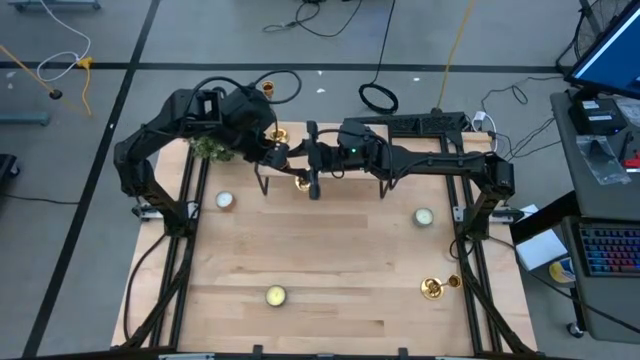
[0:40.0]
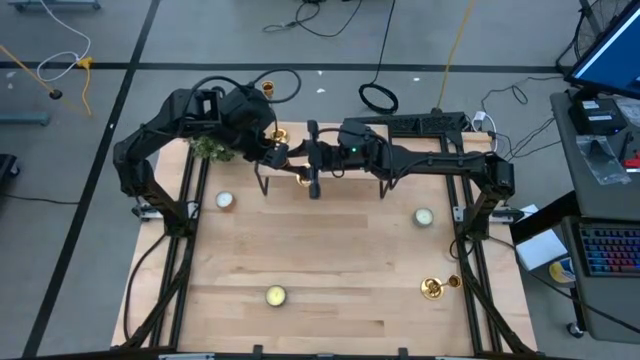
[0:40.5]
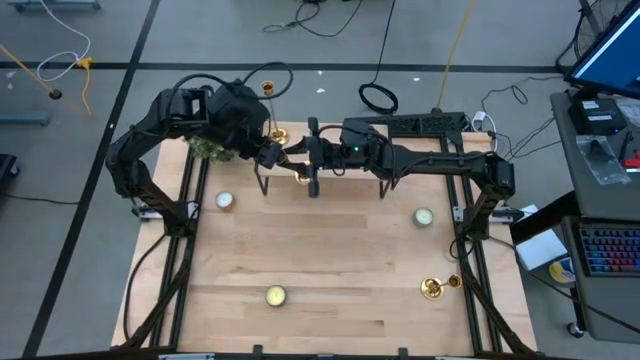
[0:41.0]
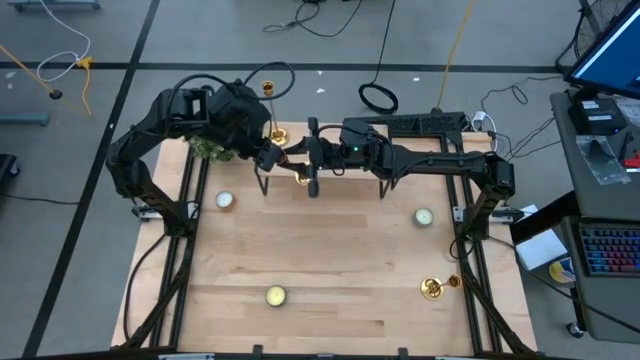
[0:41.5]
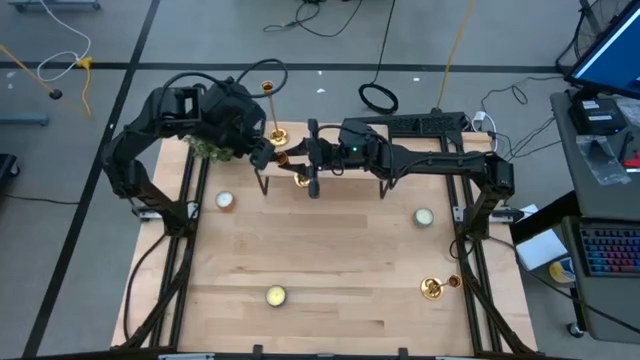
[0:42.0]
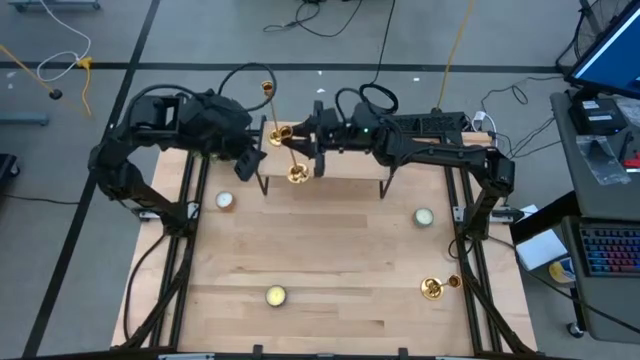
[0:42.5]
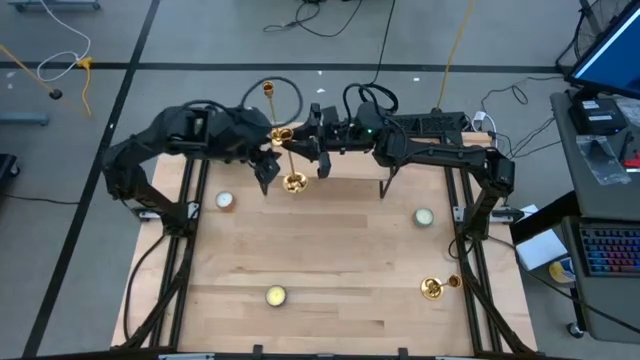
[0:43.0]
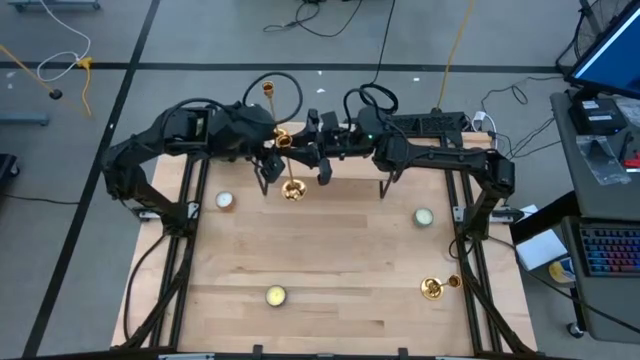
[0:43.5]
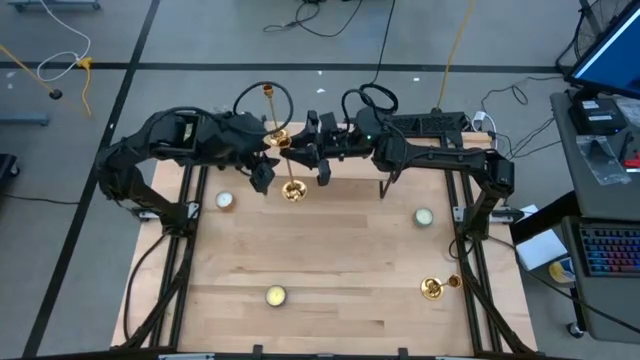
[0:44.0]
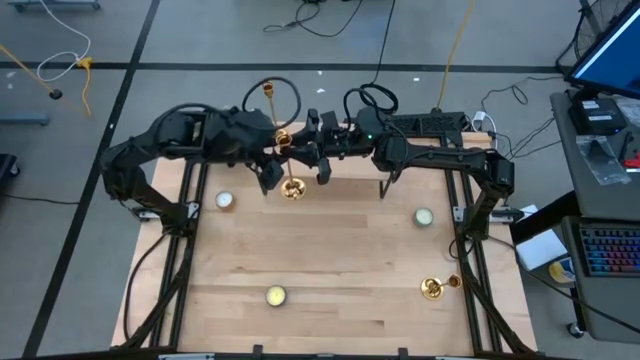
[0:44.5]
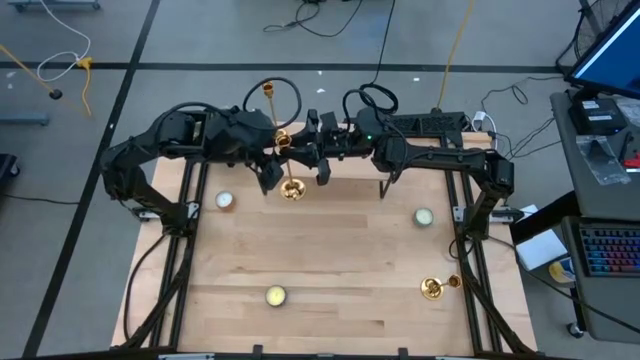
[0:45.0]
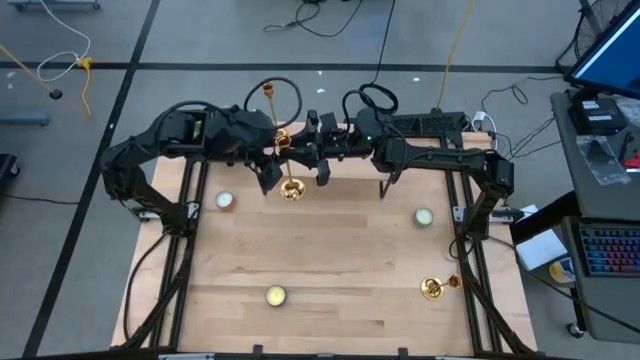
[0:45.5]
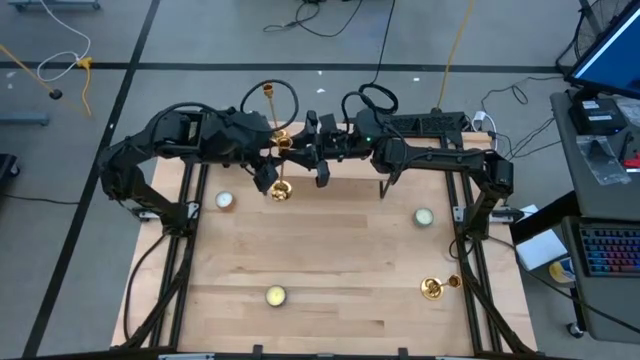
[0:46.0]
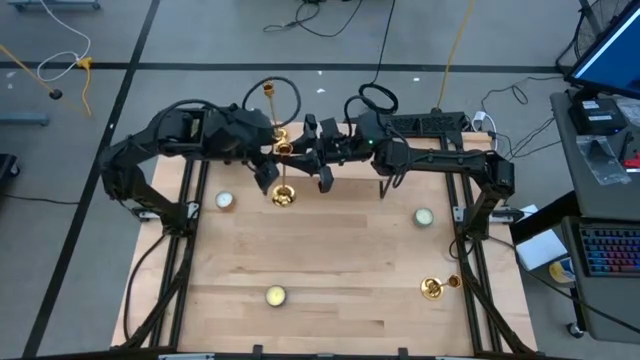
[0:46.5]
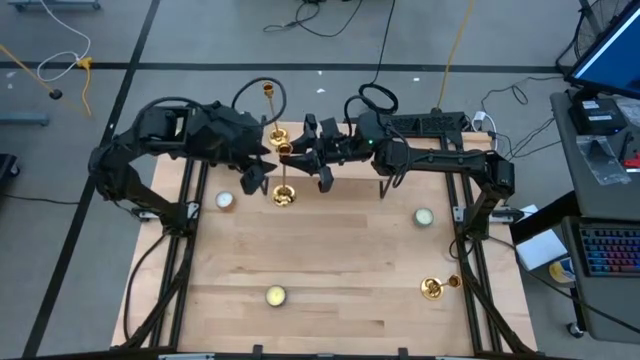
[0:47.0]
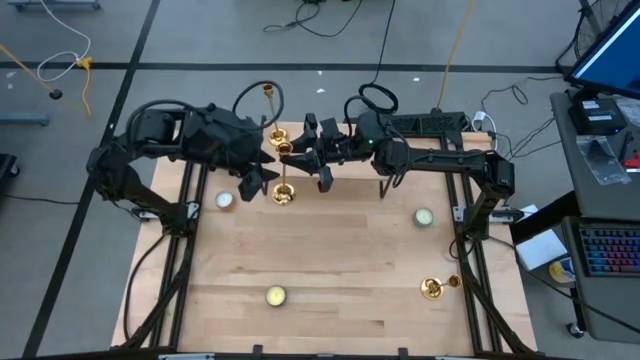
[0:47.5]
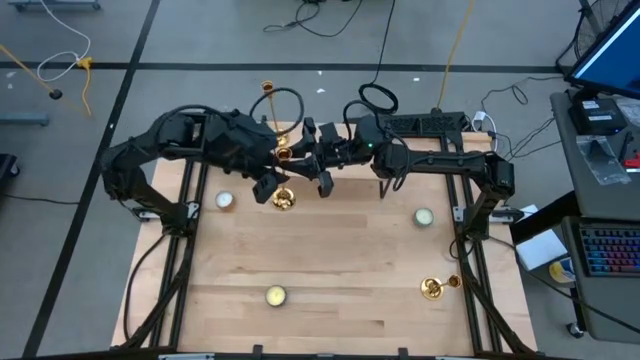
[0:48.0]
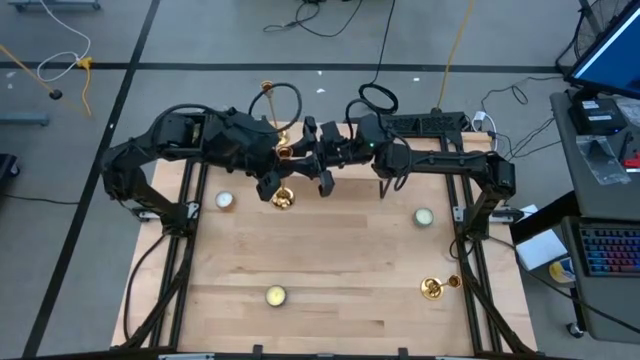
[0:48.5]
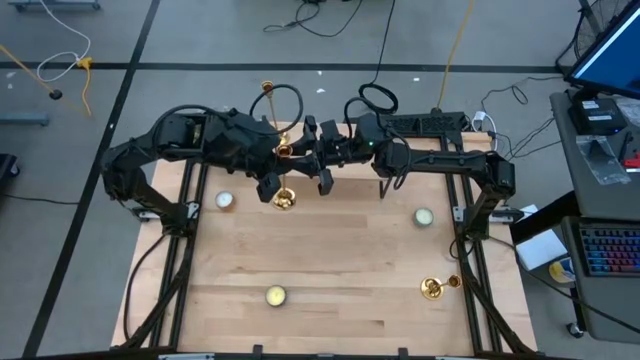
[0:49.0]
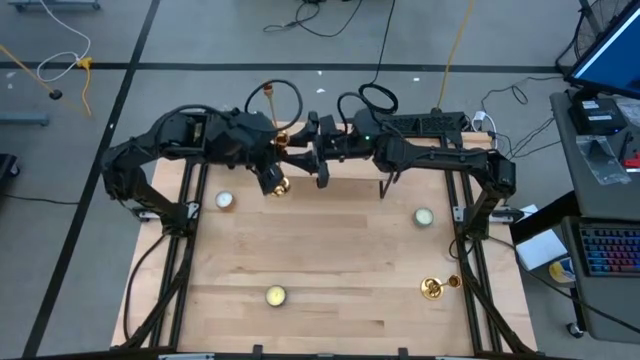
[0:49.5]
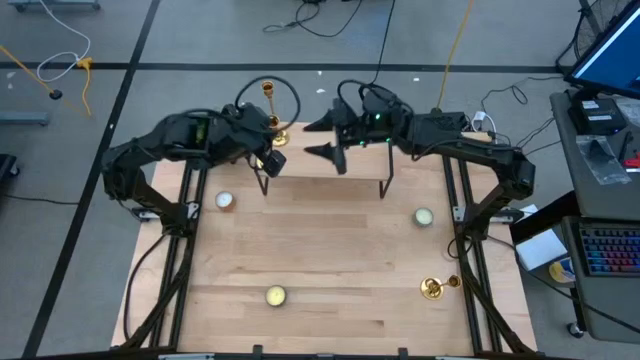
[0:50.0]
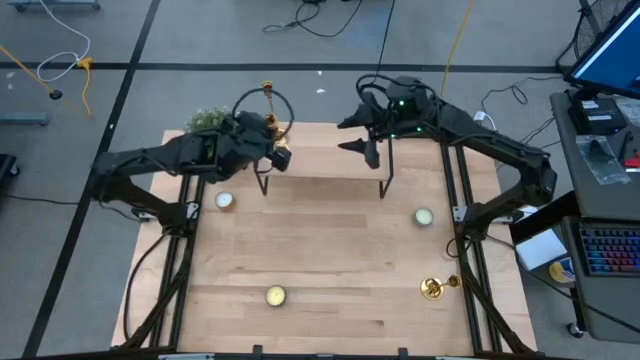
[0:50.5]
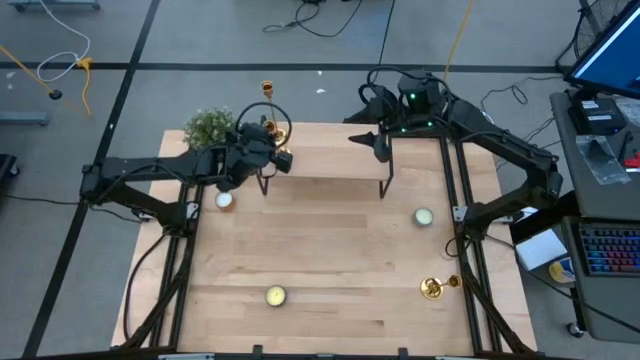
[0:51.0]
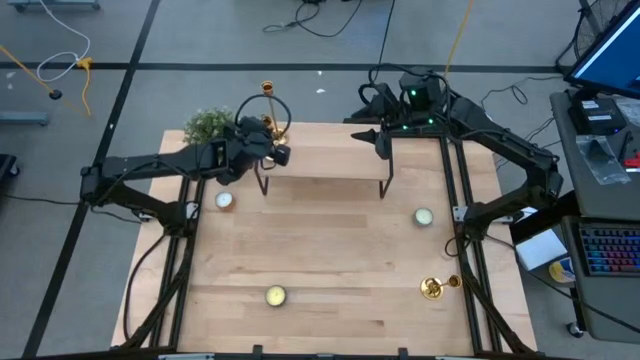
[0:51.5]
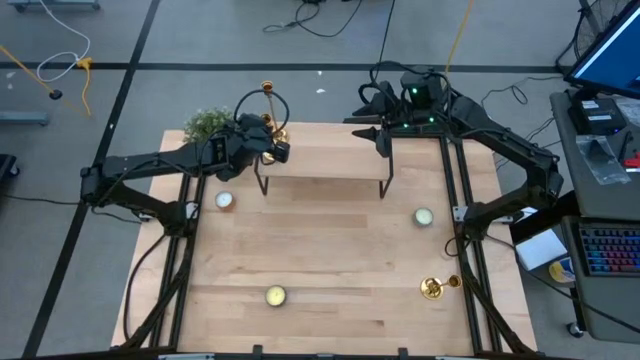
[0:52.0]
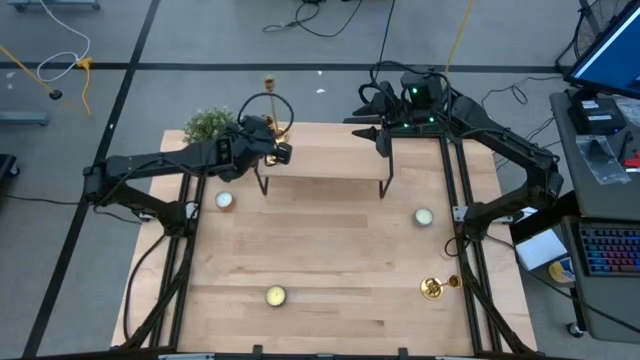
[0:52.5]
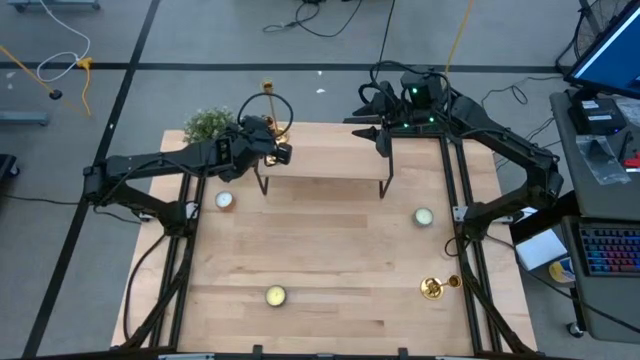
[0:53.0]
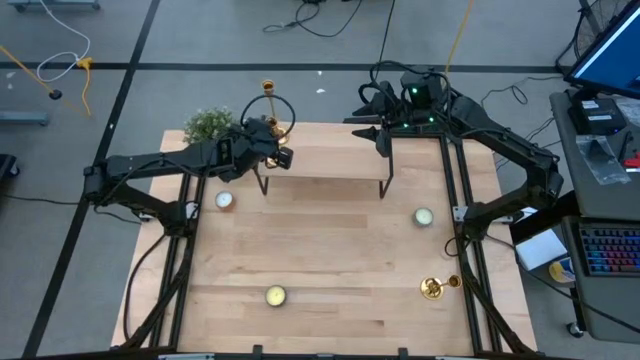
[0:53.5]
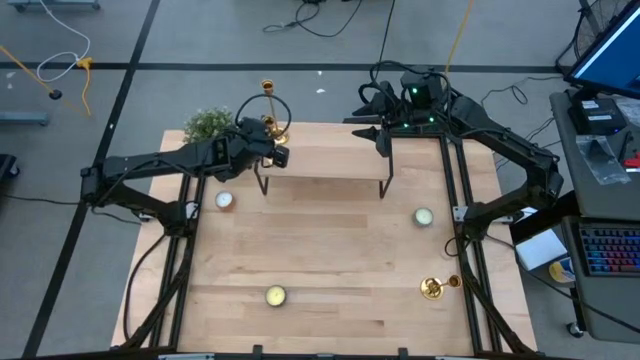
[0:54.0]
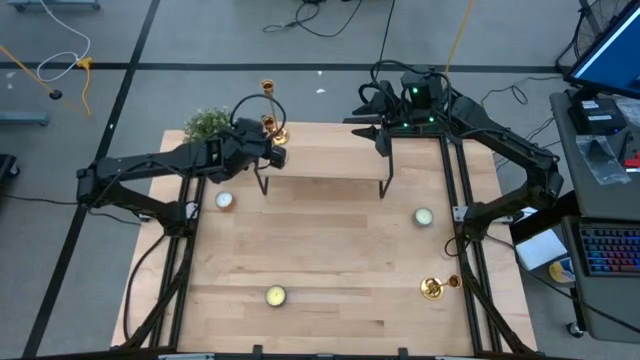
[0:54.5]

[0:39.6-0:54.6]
Task: Pick & Place candle stick holders
Put the left gold candle holder on the shelf

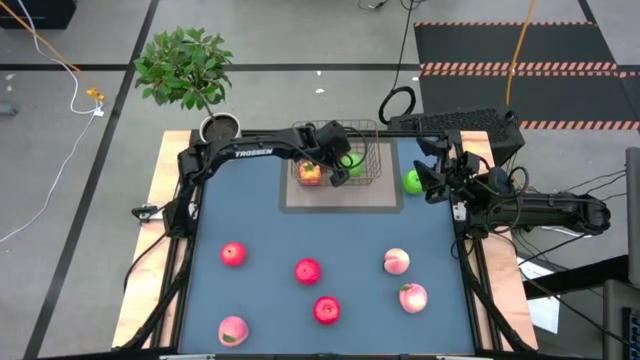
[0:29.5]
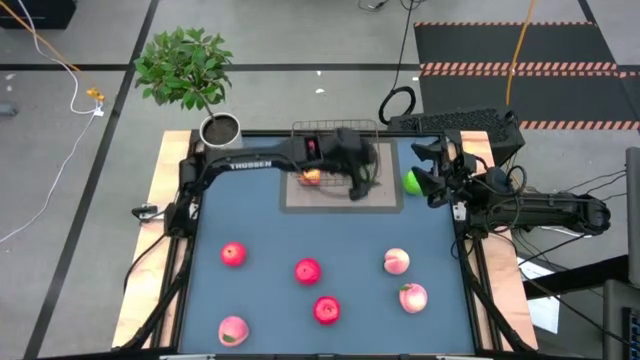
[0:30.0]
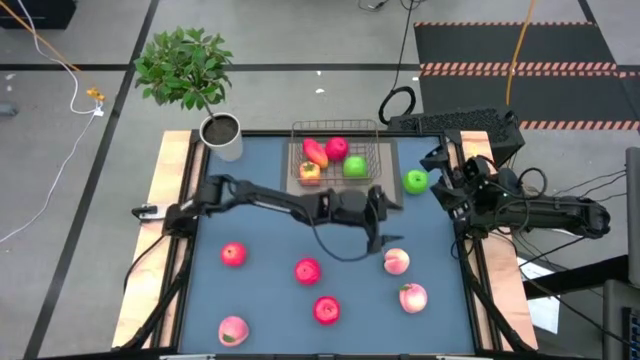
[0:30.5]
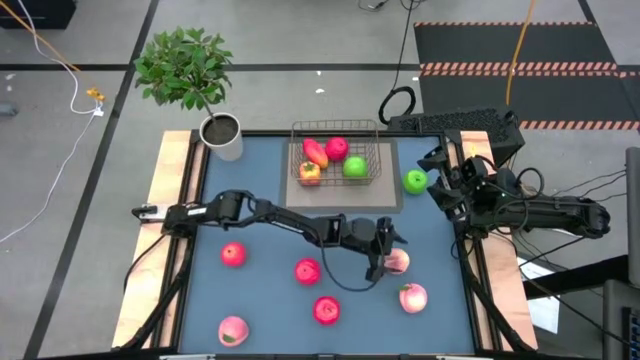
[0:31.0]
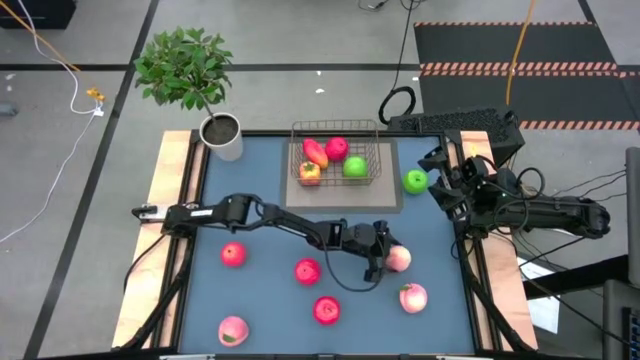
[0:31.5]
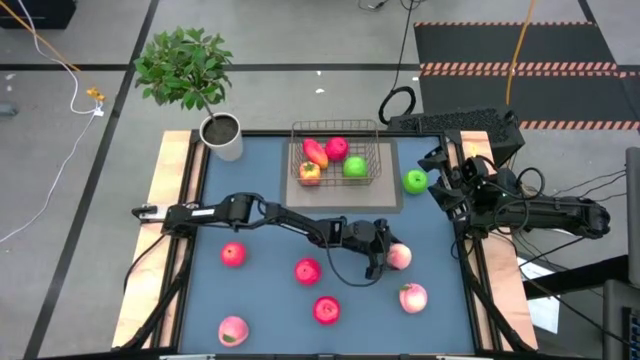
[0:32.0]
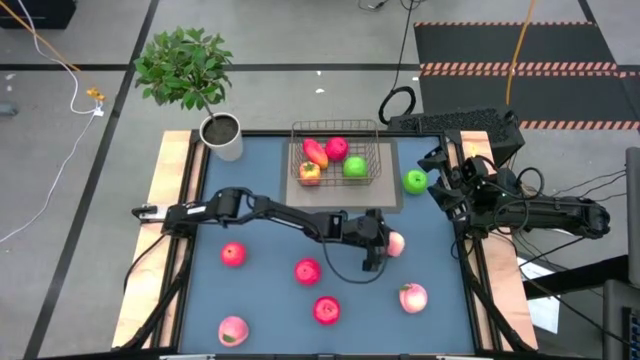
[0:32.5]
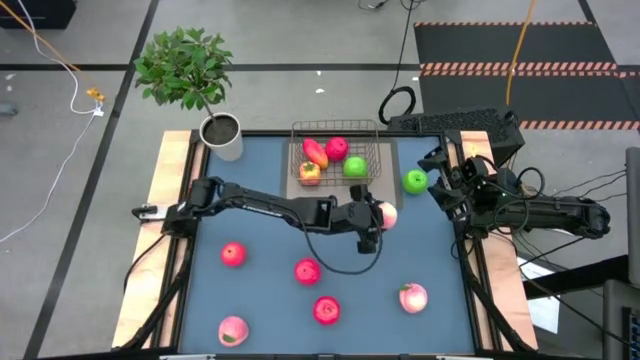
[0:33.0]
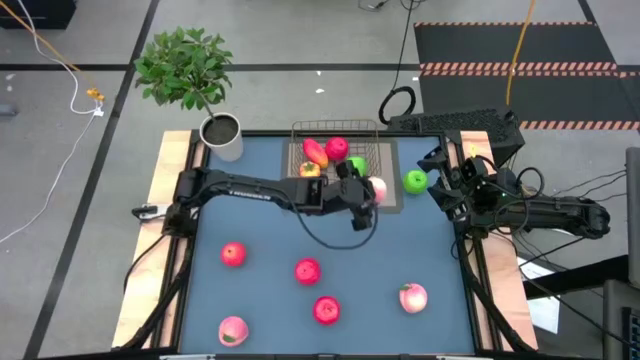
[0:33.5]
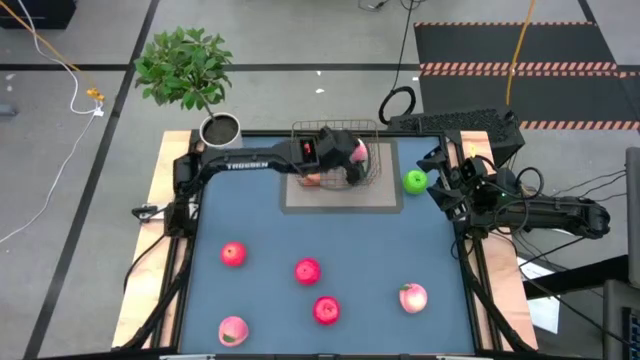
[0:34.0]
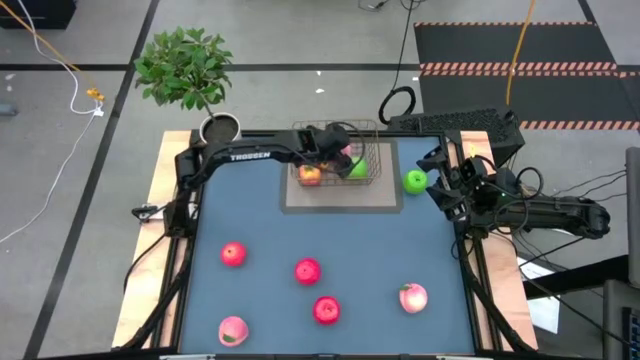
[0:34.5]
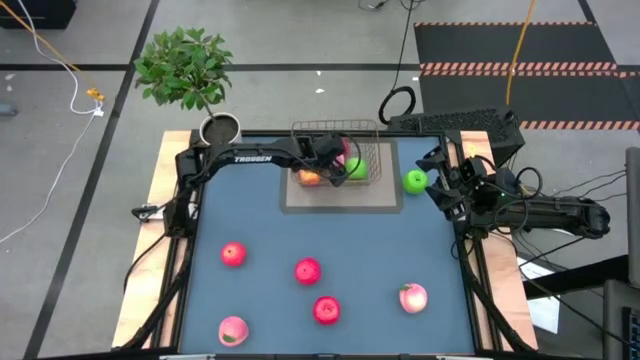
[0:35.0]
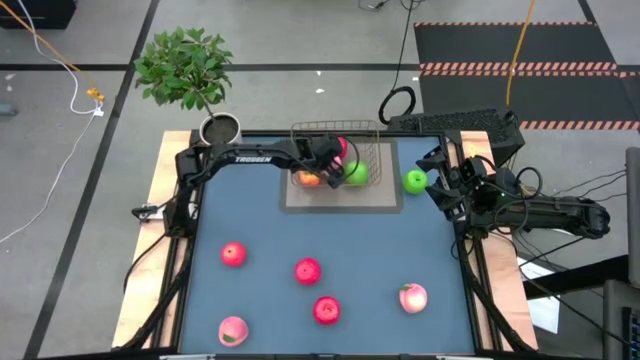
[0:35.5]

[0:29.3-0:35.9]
Task: Build produce basket
Put the pink peach into the wire basket
